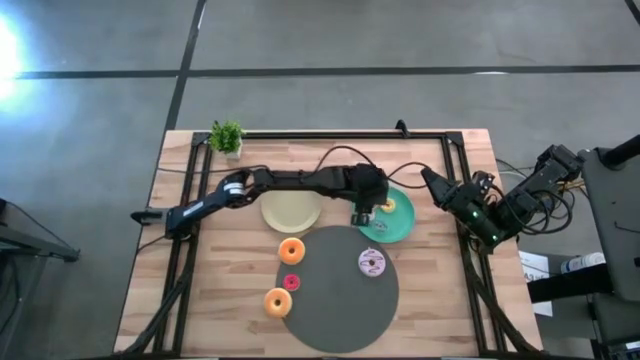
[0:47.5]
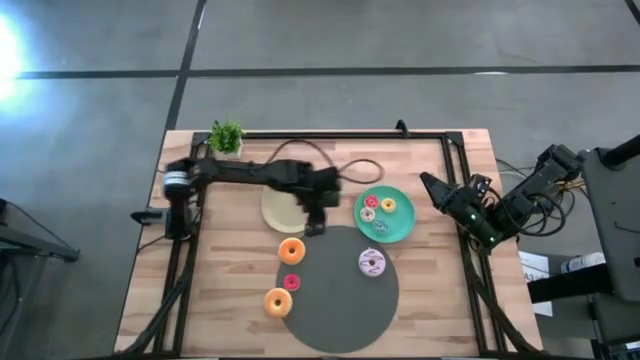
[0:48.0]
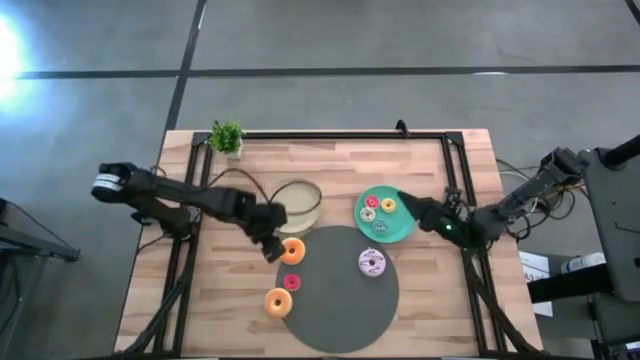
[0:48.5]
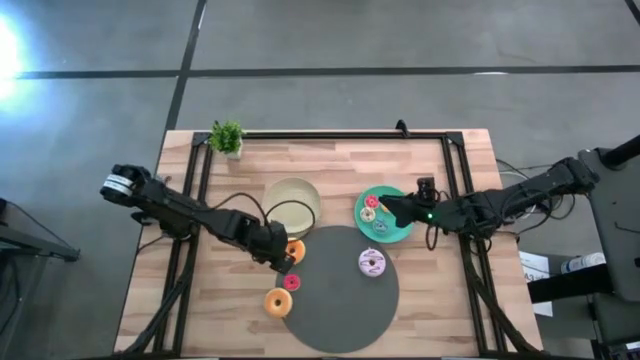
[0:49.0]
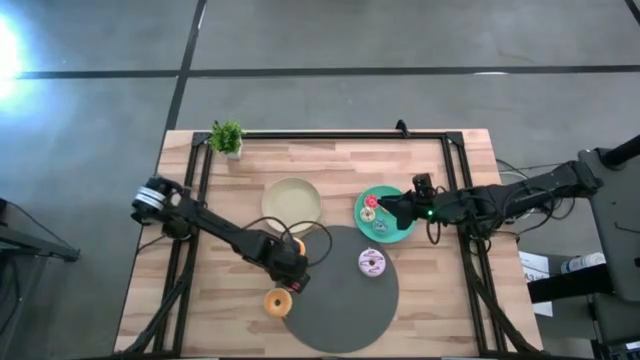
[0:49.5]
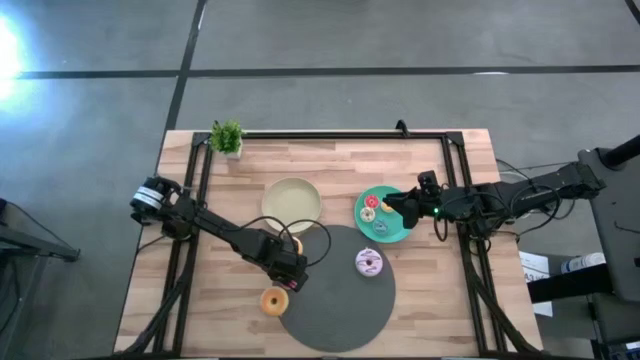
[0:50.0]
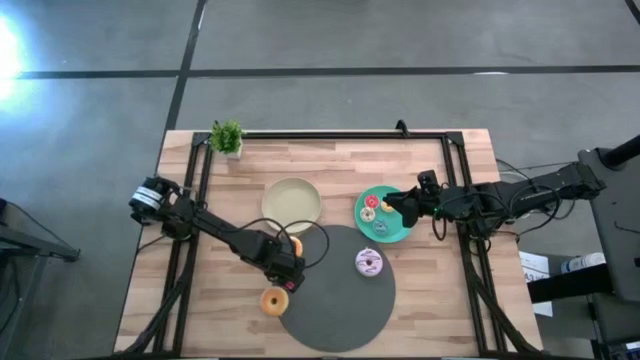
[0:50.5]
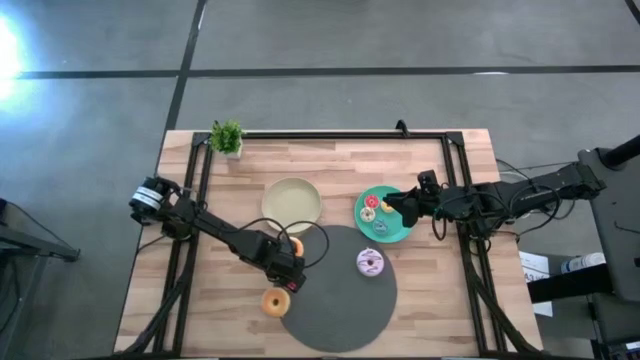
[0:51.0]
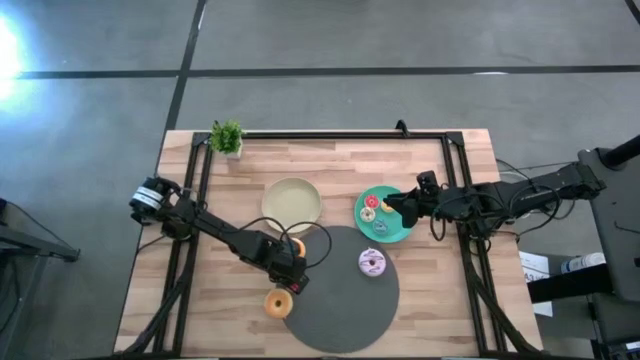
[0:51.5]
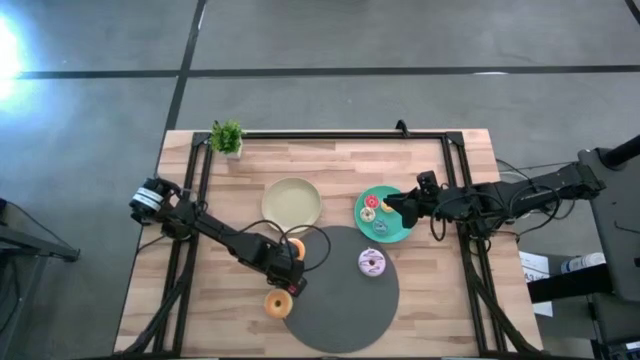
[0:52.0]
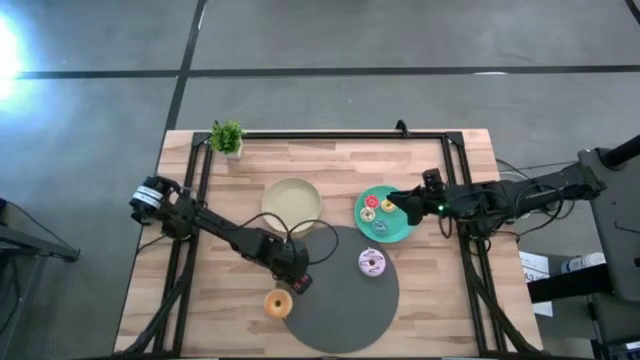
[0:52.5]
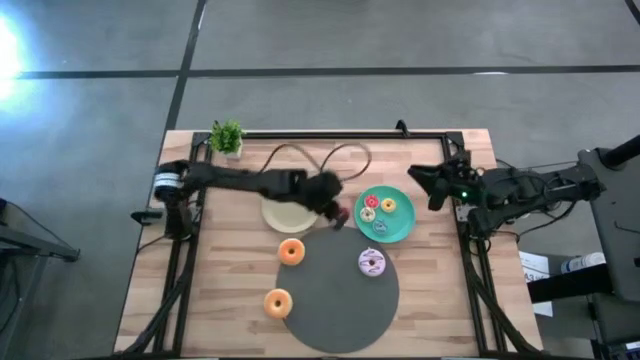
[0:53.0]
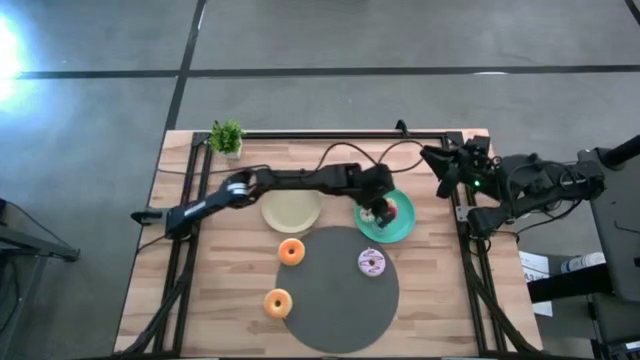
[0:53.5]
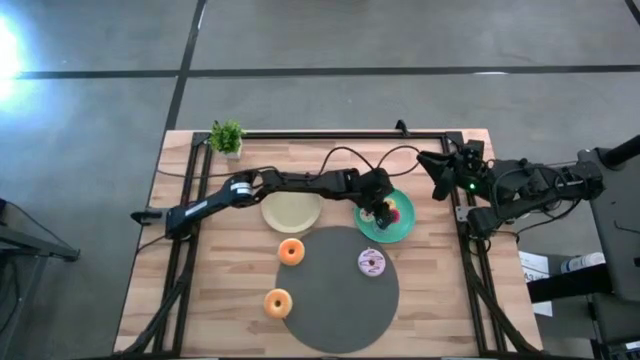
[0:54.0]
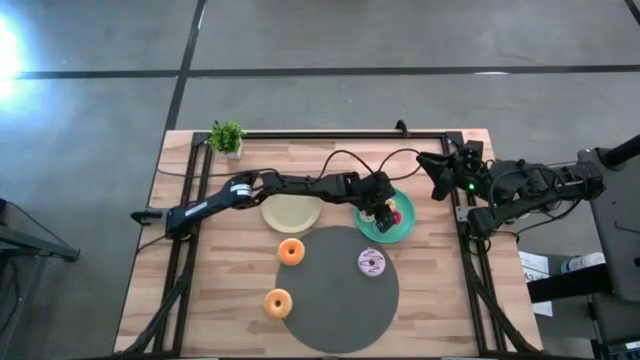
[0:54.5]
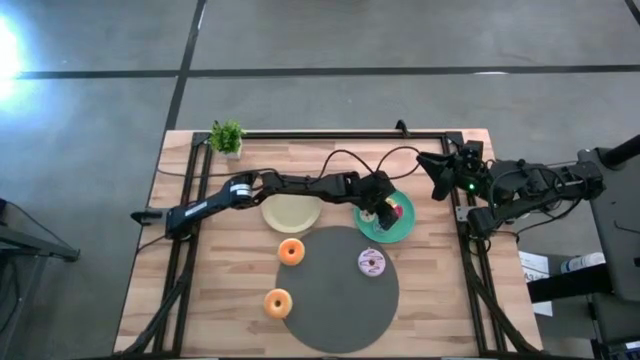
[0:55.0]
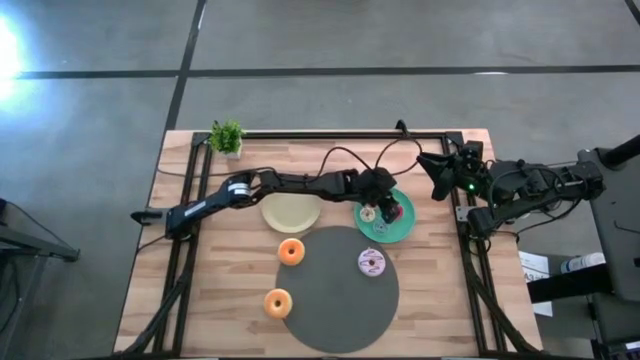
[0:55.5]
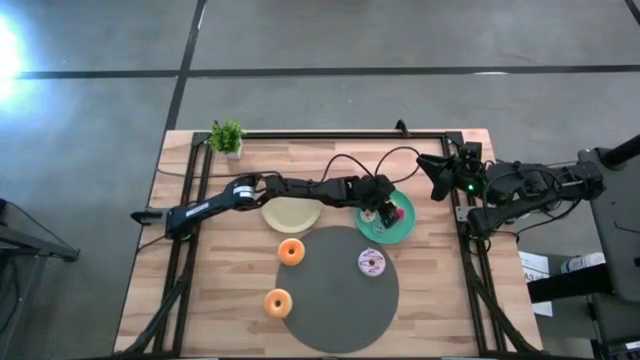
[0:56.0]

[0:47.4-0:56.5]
Task: Pick & Place donuts
Put the small red donut on the green plate

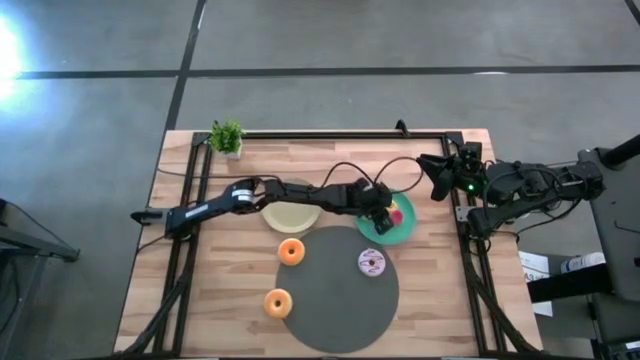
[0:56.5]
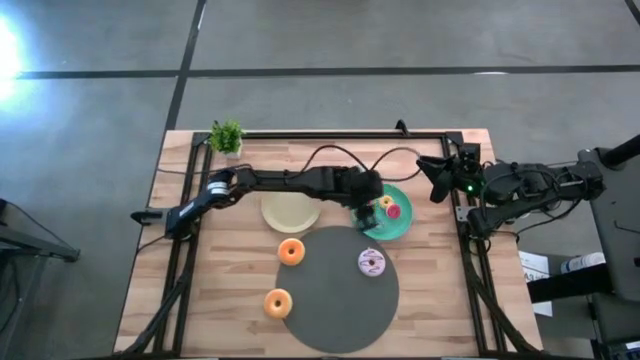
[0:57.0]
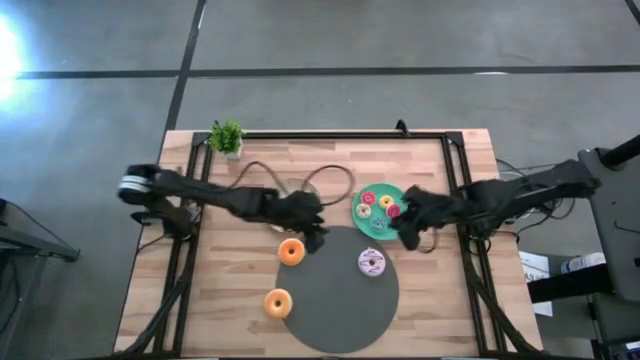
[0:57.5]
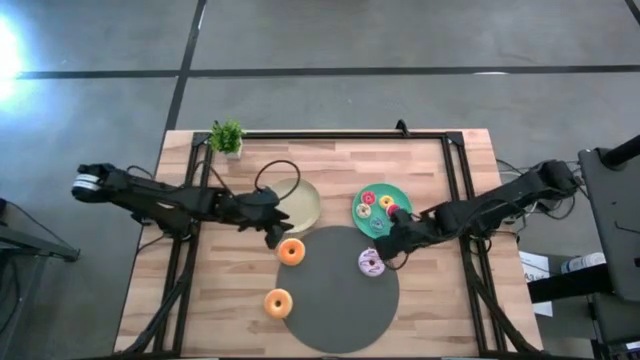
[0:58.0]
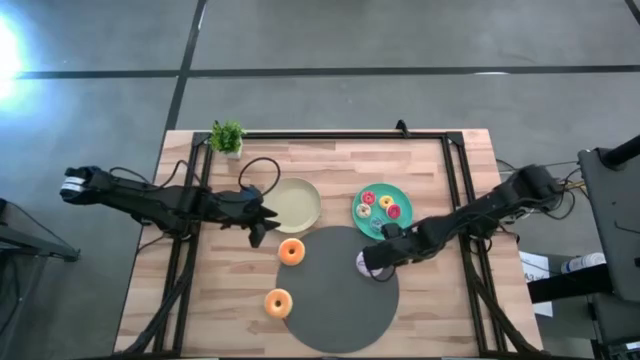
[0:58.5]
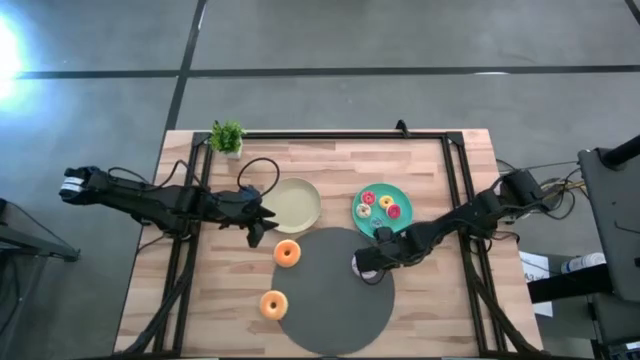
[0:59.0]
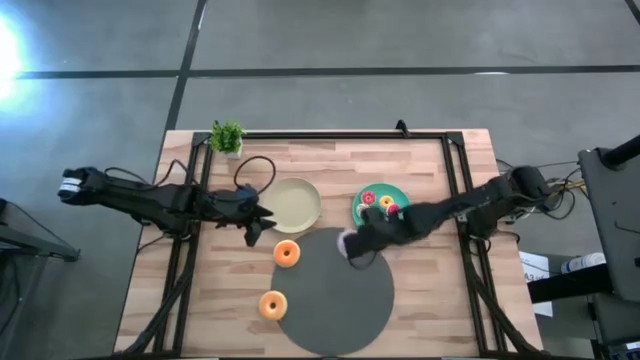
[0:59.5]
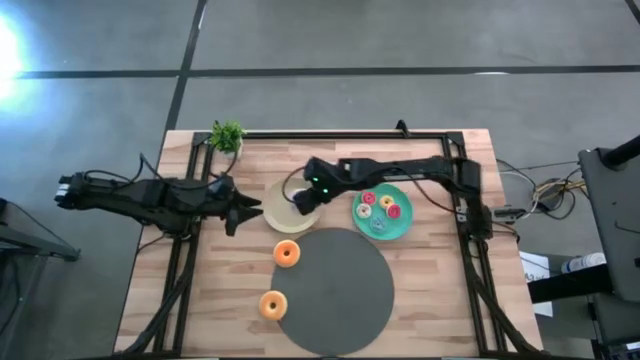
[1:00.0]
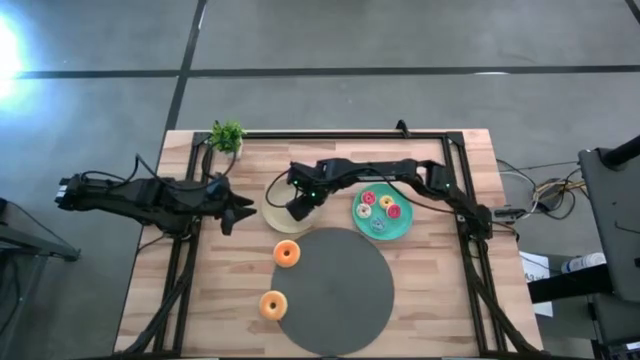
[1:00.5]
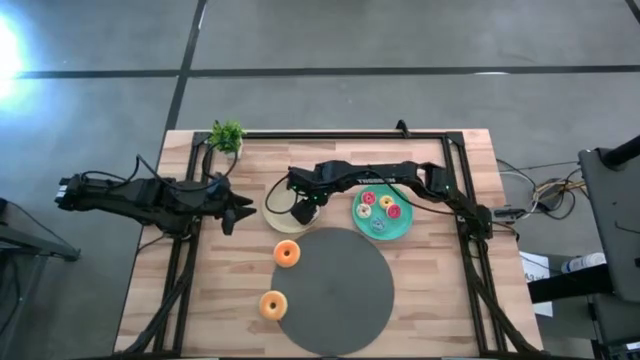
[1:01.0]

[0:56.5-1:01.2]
Put the big purple donut on the gray plate

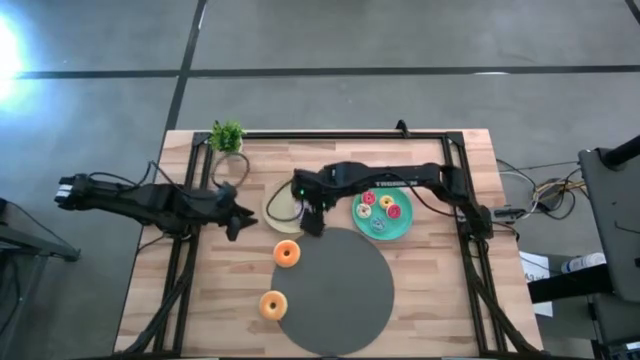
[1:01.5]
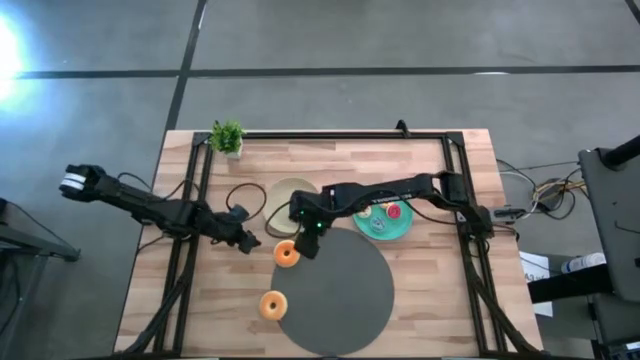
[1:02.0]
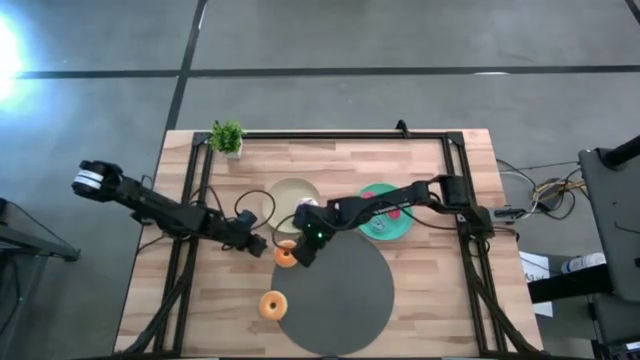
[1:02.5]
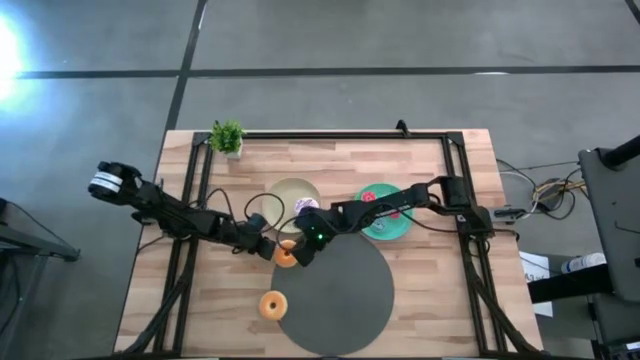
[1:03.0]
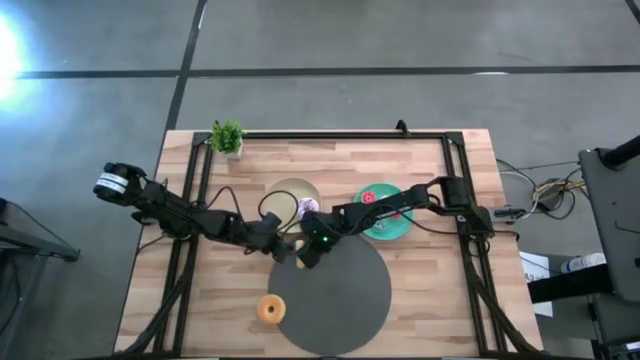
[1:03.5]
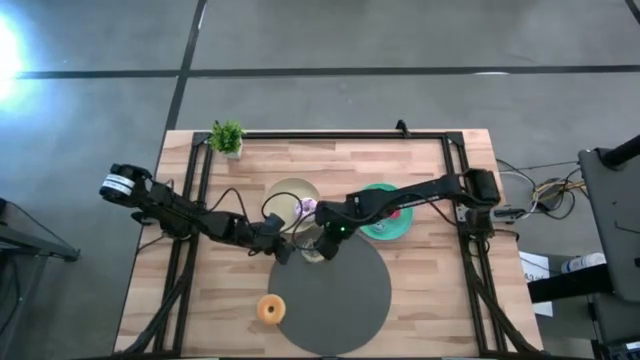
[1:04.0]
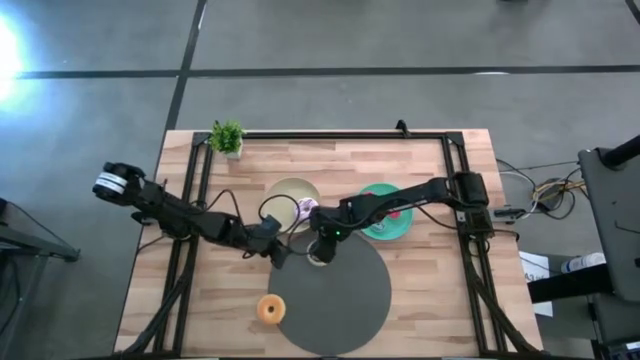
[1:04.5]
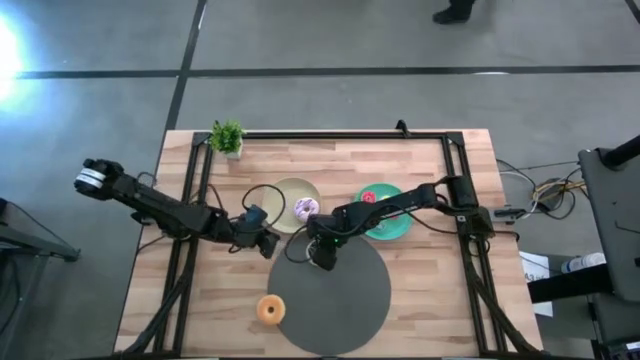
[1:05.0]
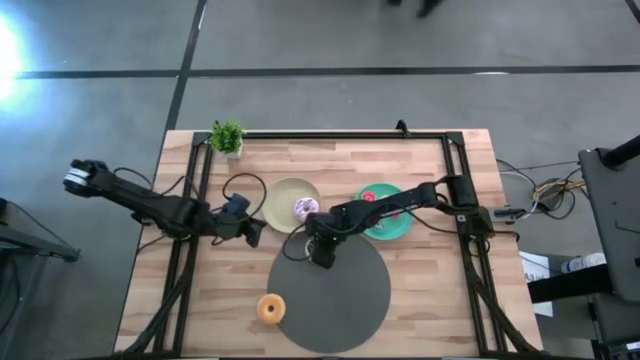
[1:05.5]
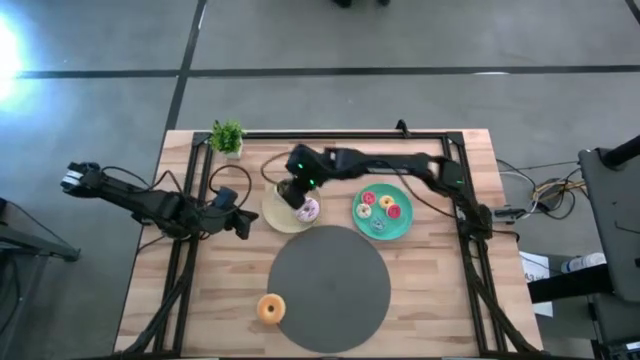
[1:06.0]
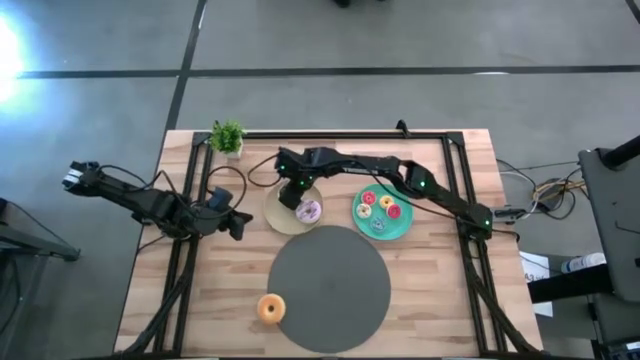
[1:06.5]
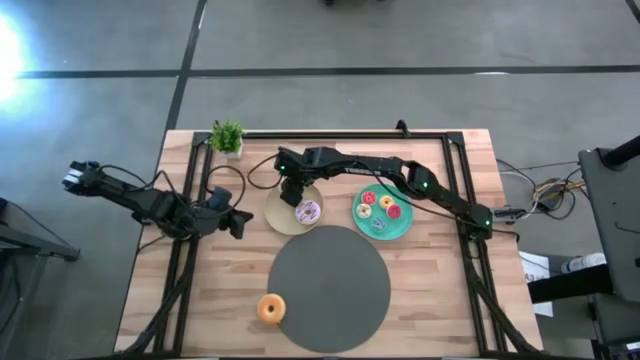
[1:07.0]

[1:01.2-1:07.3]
Put the big black donut on the gray plate

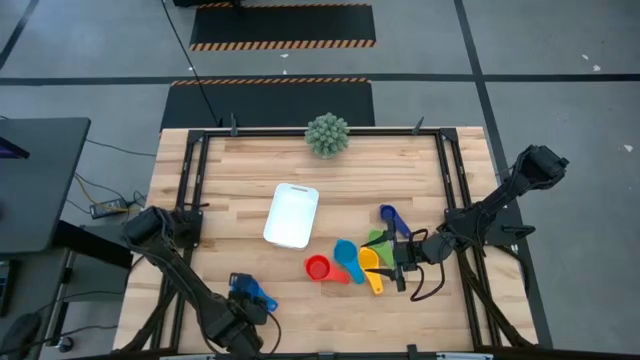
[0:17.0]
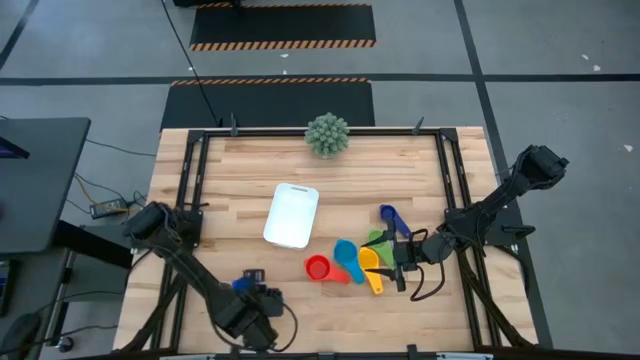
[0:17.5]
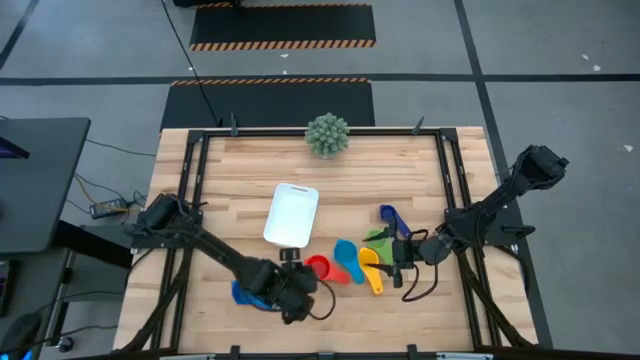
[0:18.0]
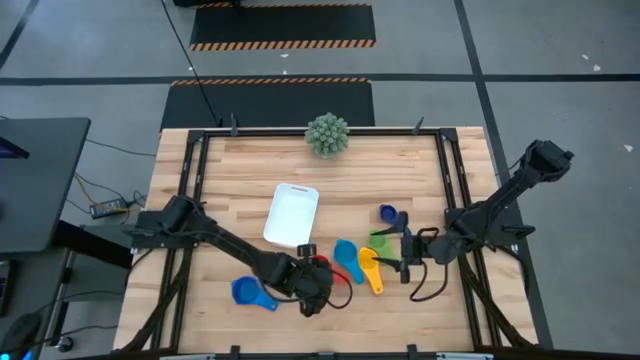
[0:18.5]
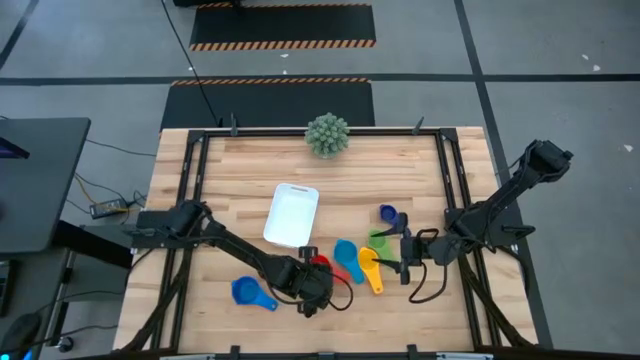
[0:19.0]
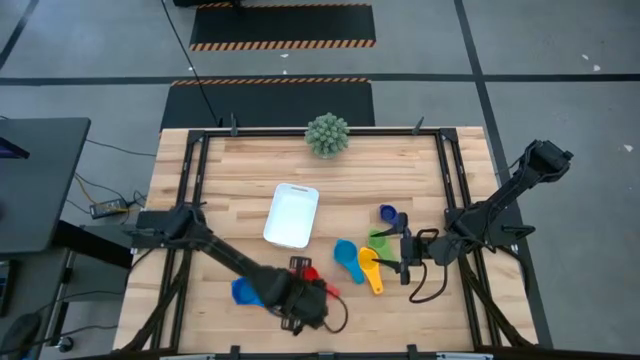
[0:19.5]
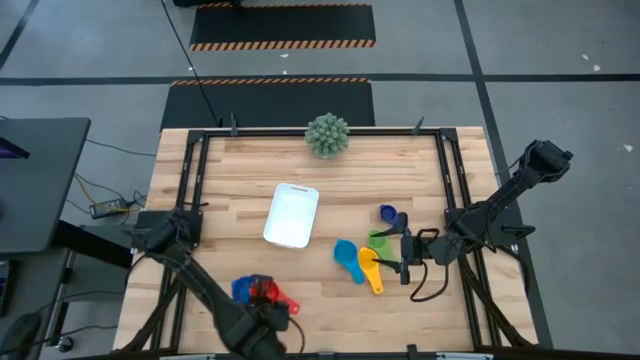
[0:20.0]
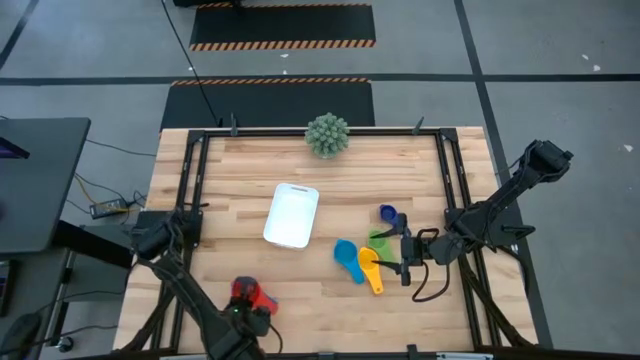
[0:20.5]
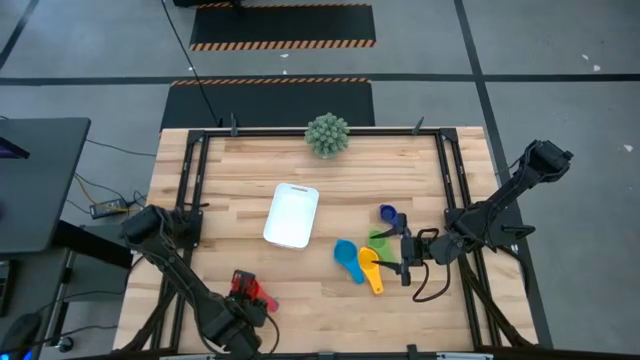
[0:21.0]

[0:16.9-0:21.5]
Task: Nest measuring cups in basket
Stack the red measuring cup on of the top the blue measuring cup
